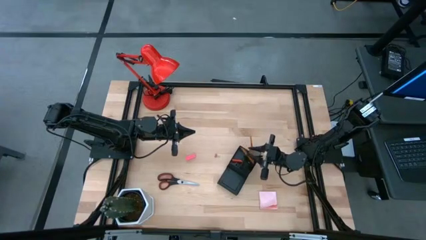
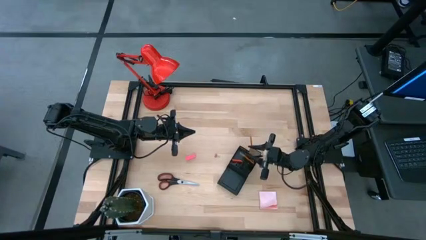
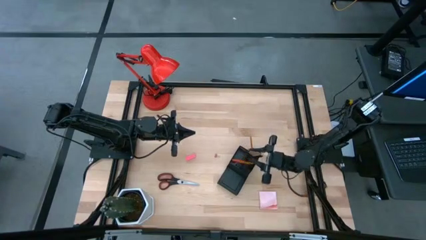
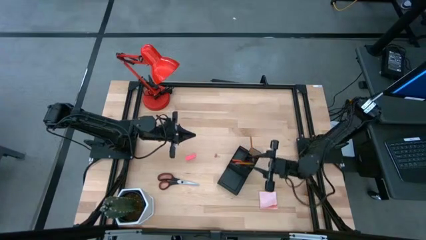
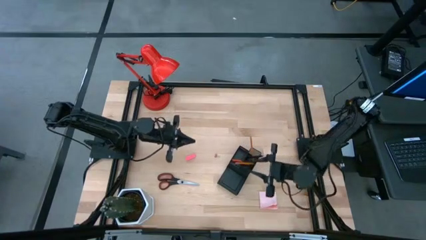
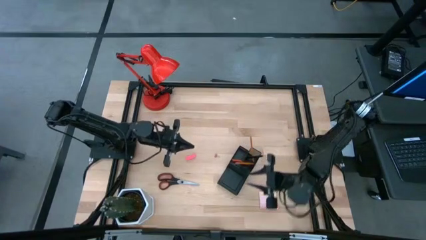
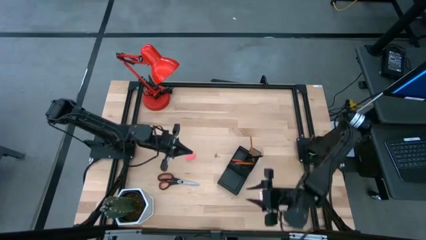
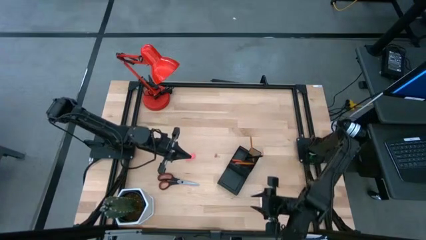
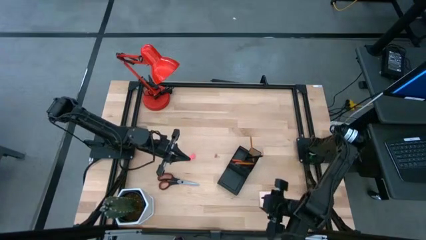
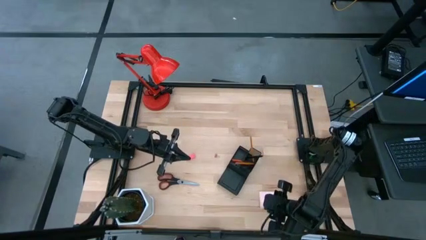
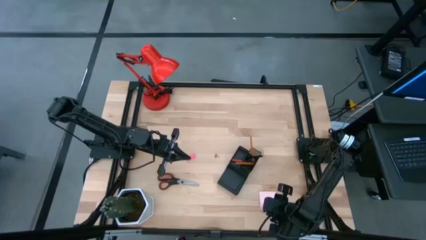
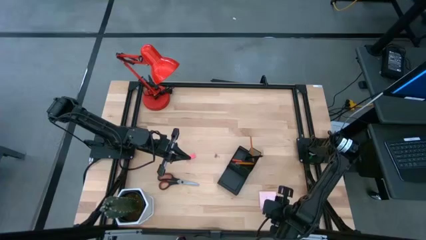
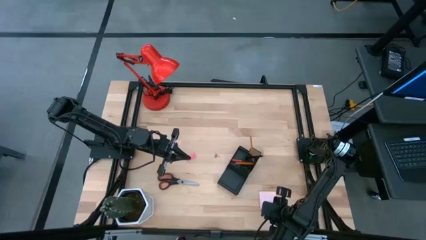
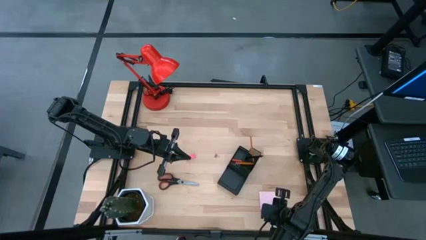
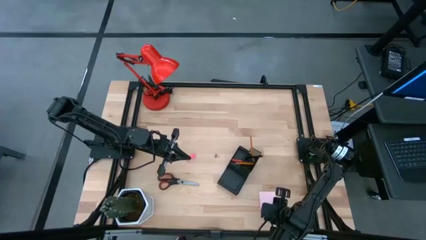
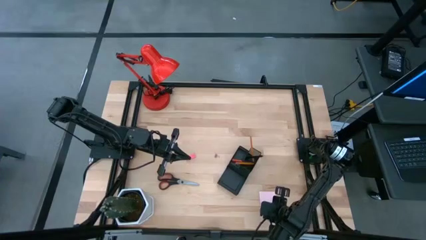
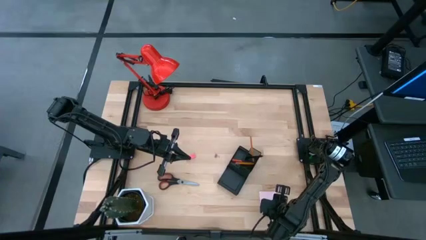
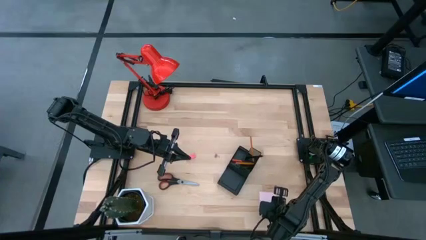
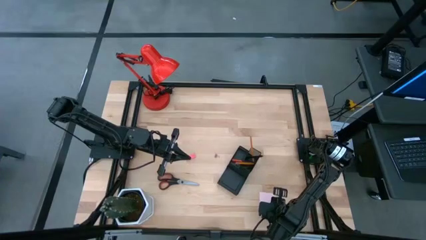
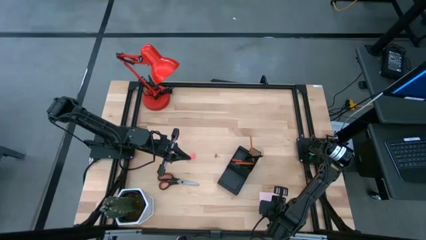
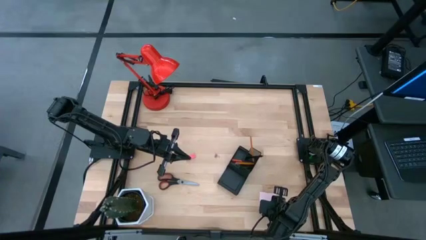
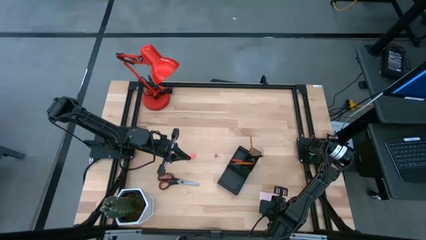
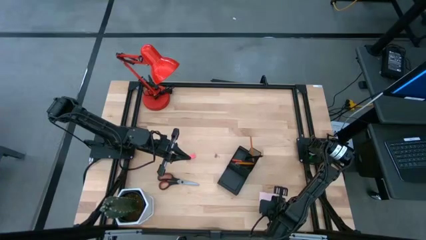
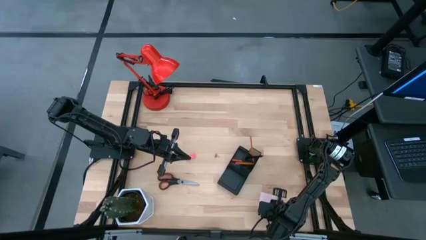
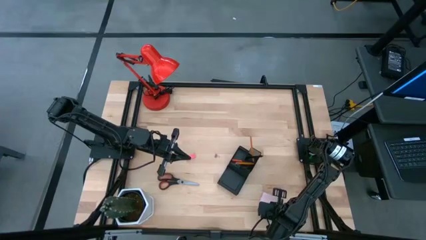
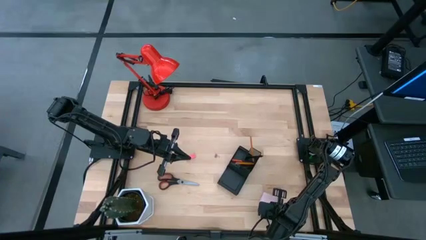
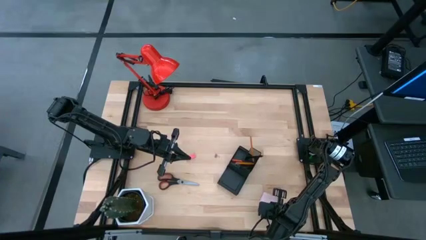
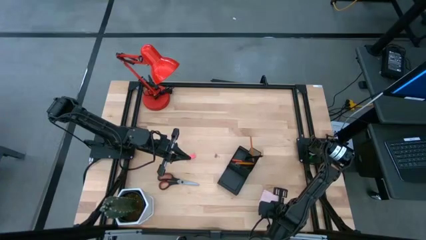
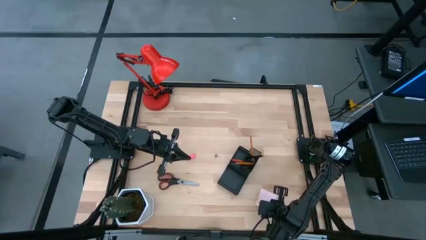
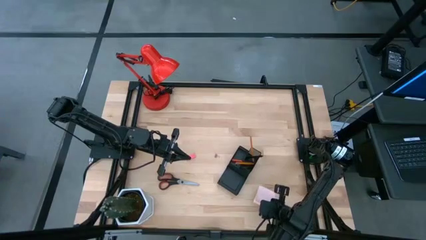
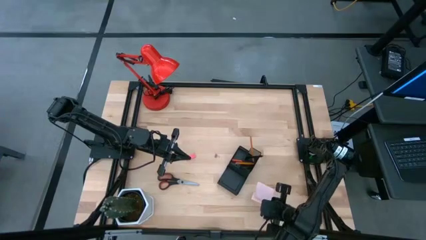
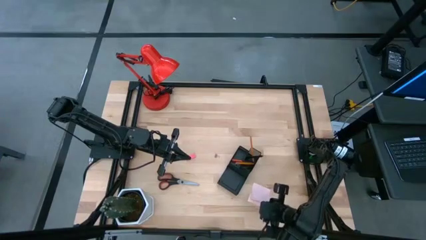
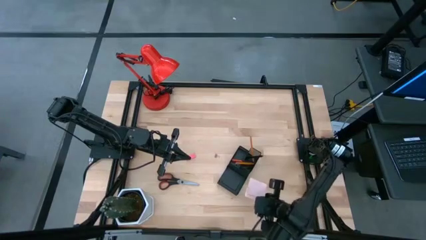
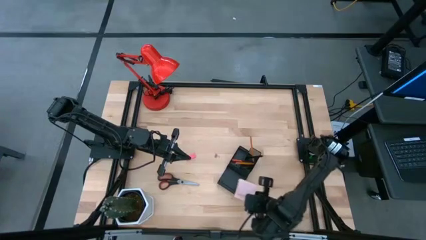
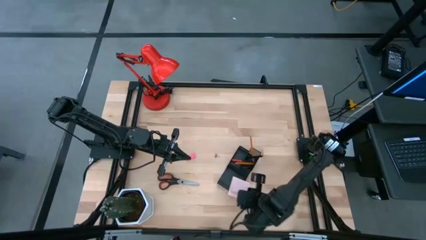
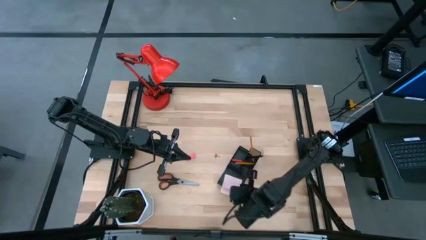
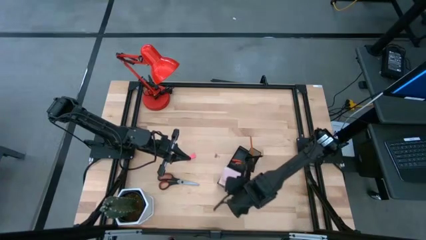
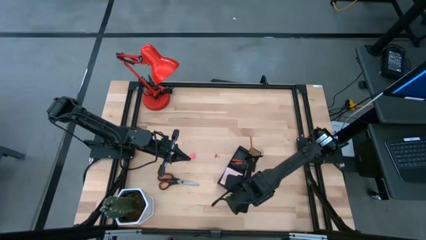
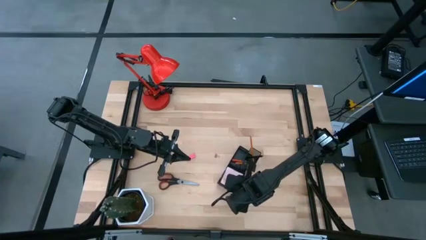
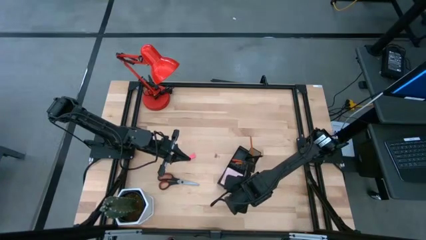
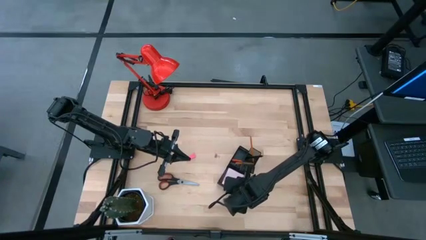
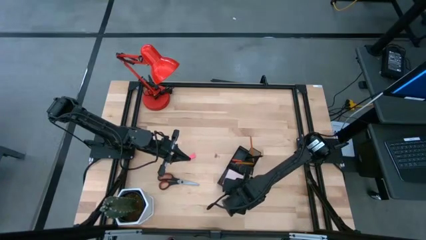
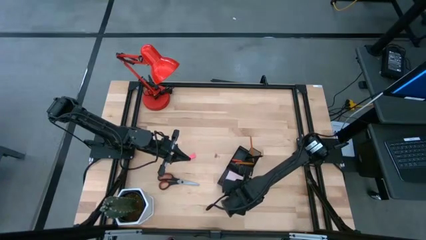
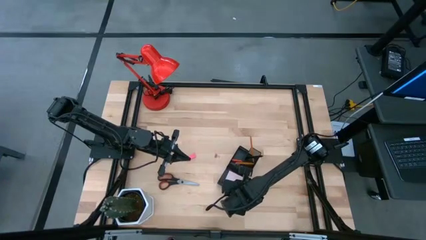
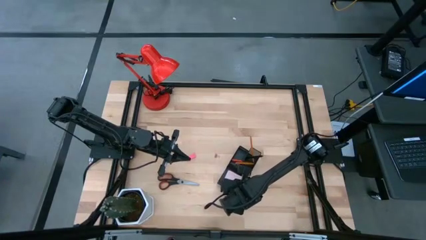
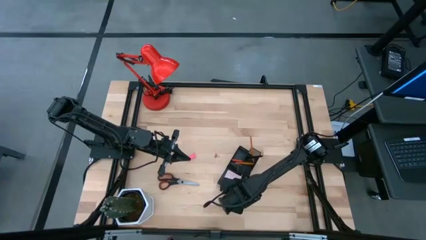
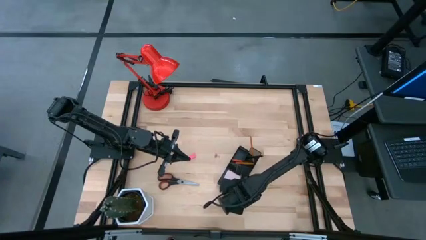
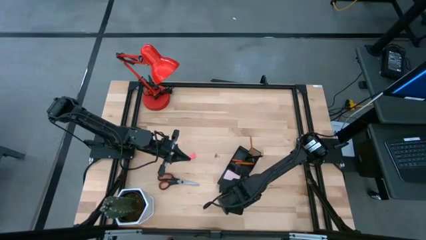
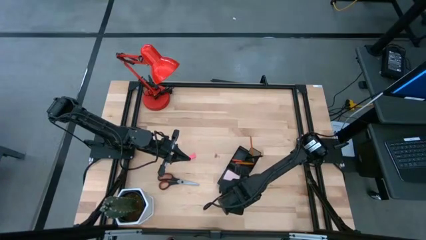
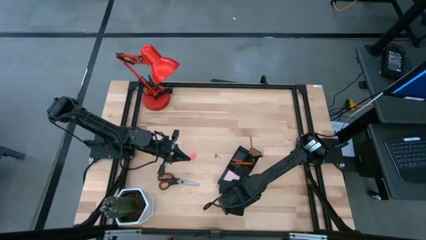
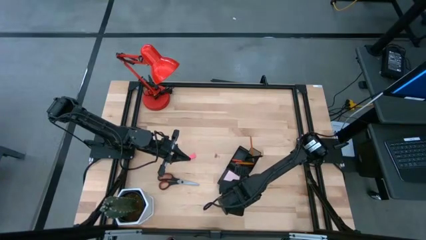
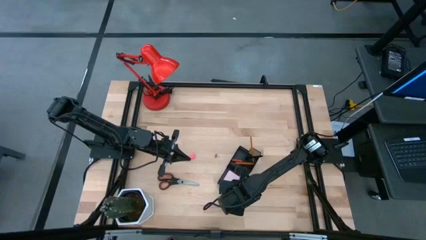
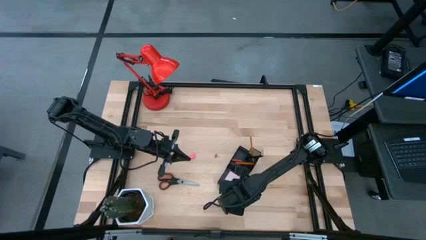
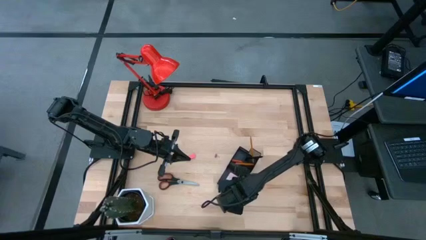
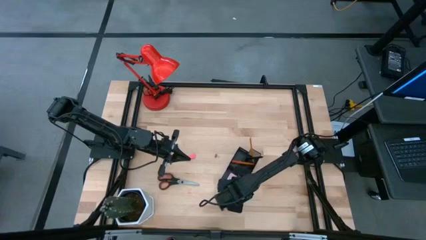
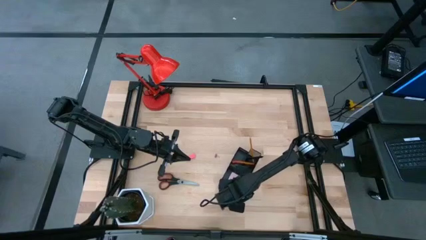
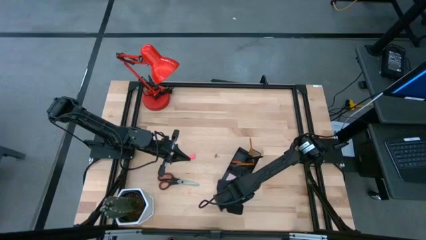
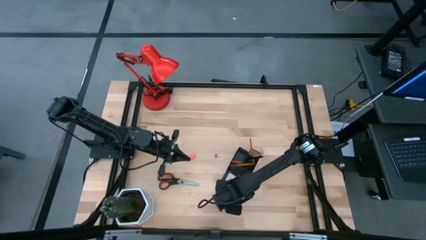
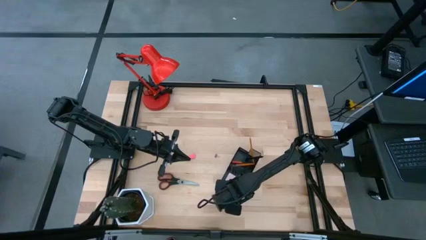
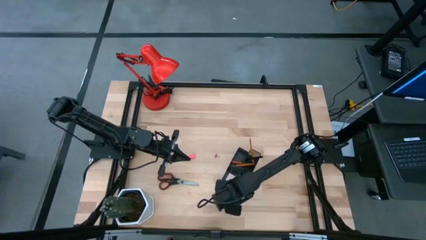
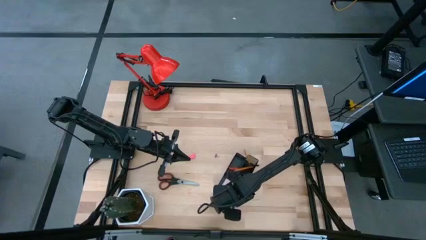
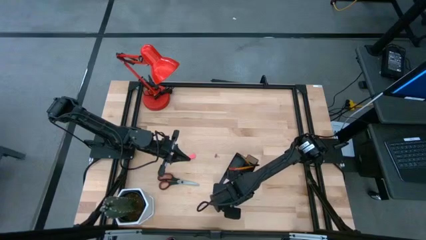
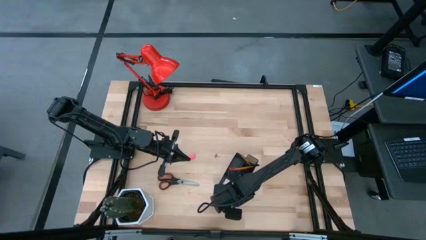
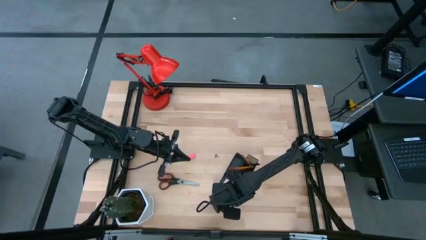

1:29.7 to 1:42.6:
Task: Pick and place office supplies into organizer
Put the sticky notes into the desk organizer
